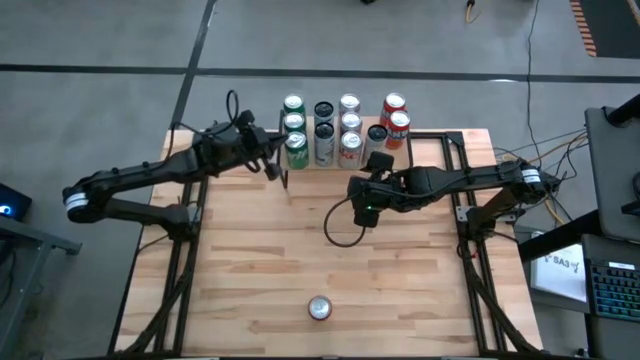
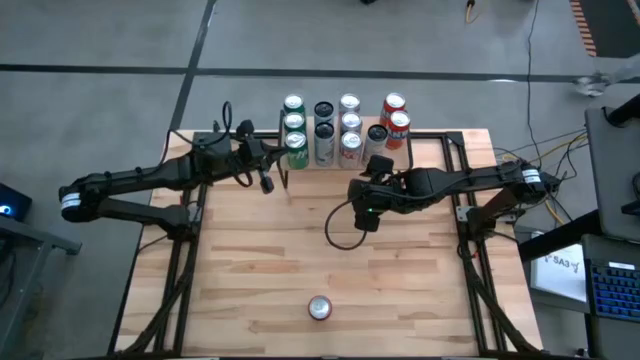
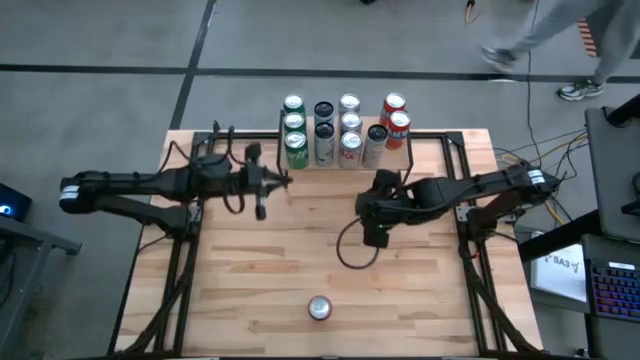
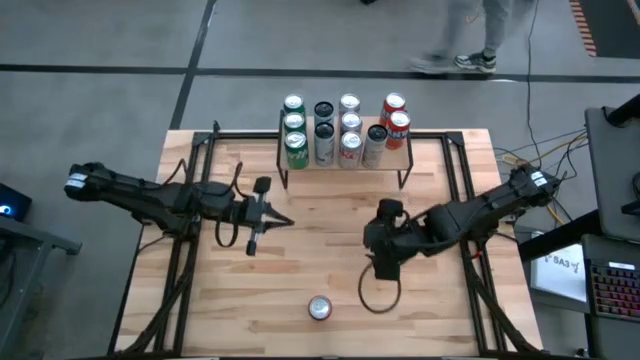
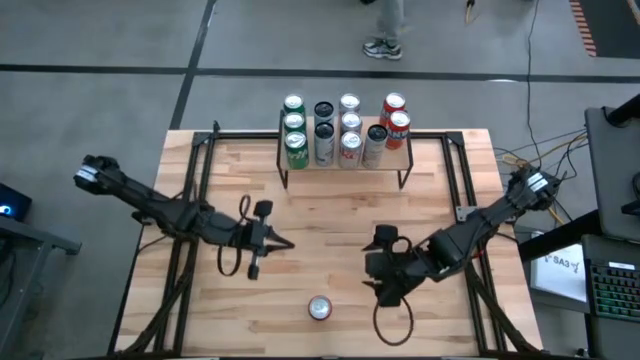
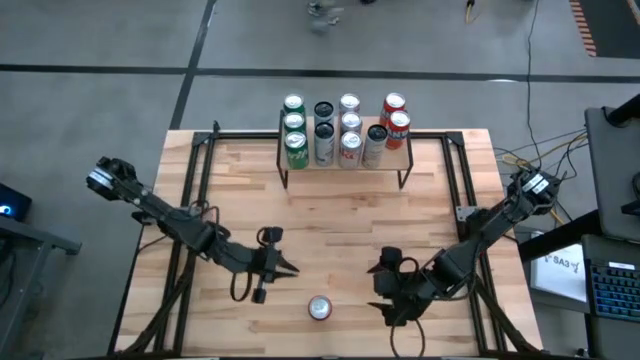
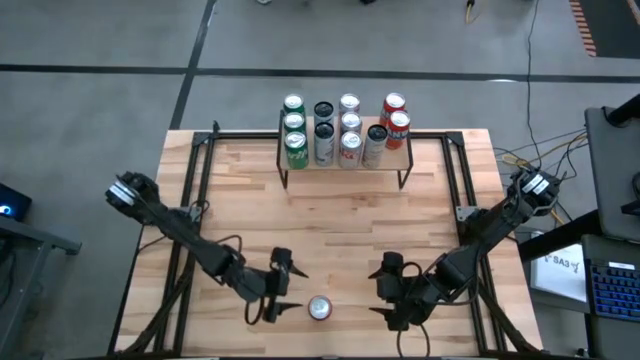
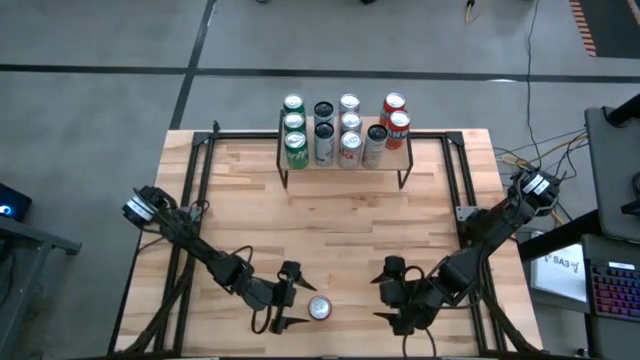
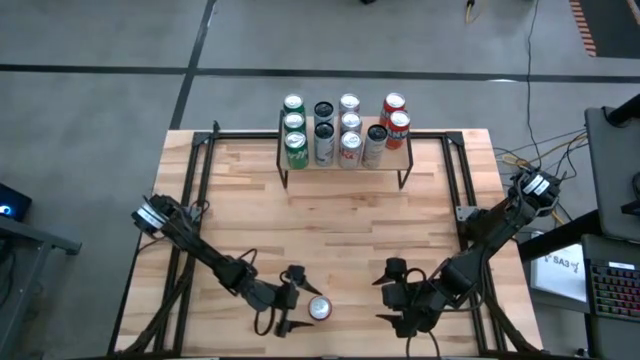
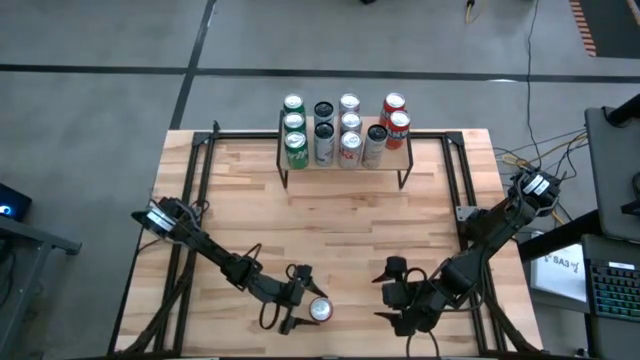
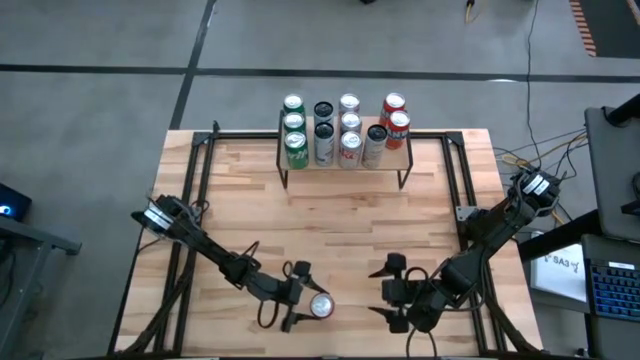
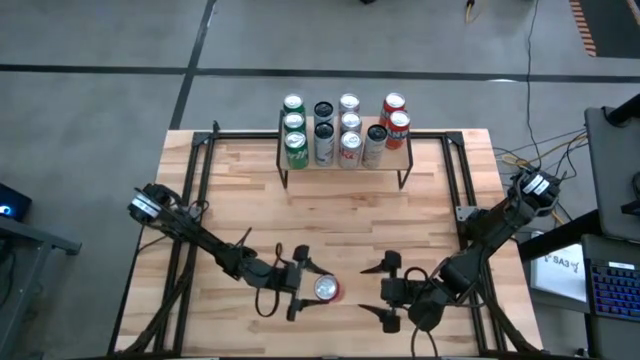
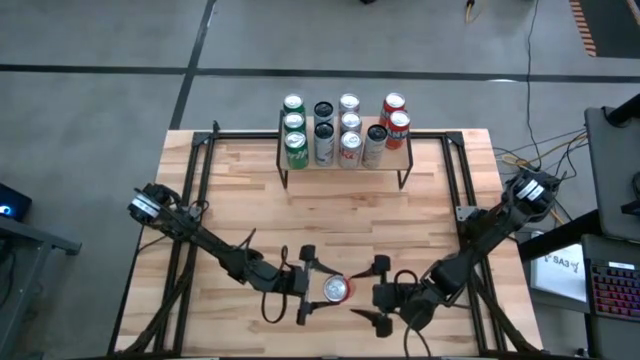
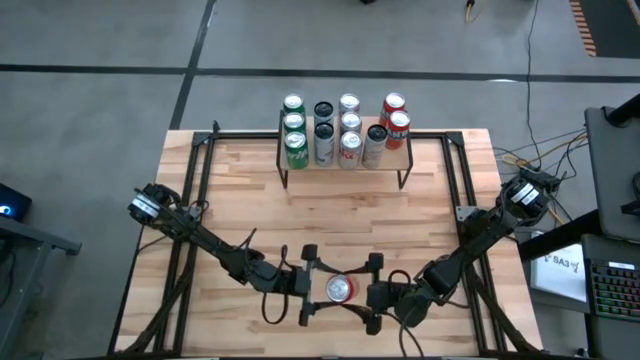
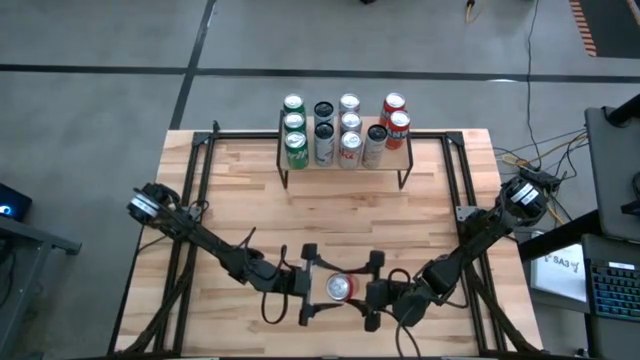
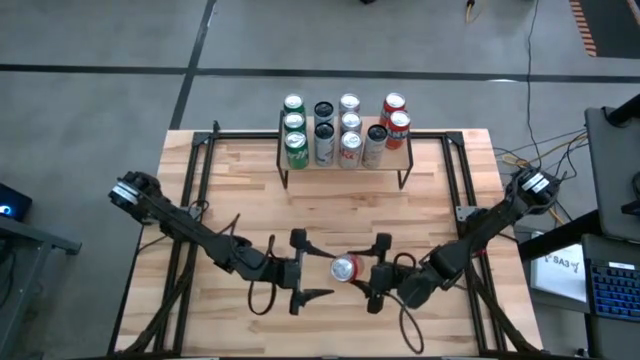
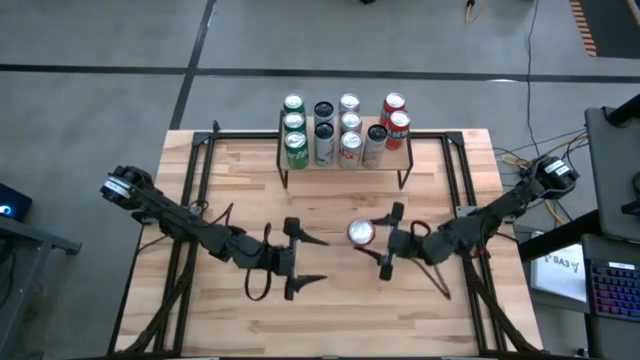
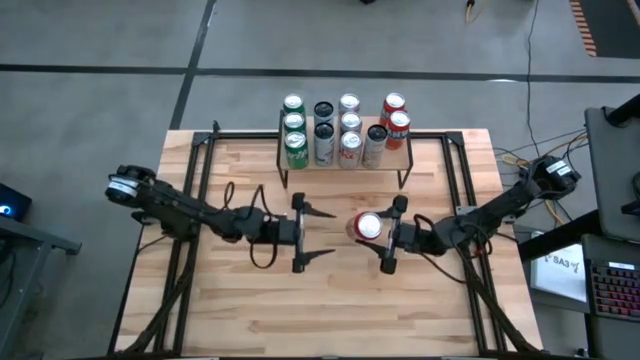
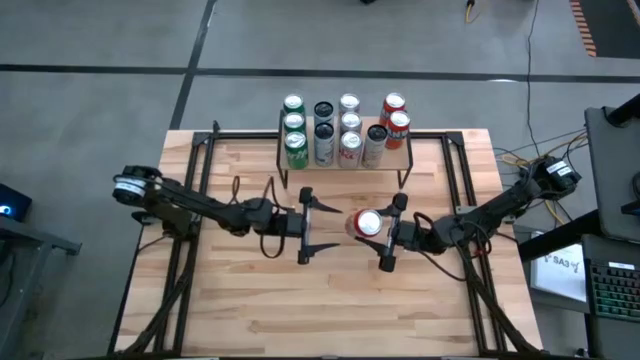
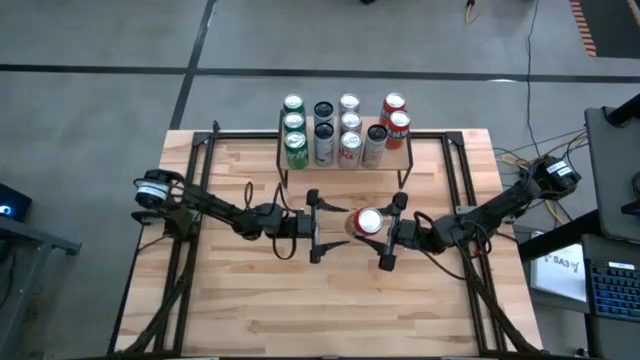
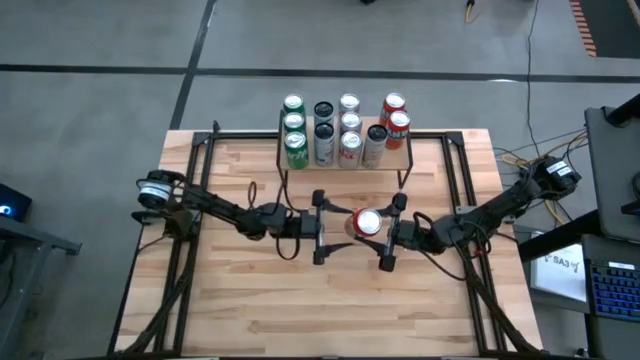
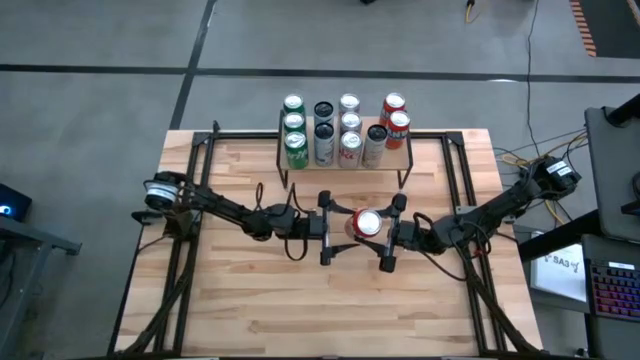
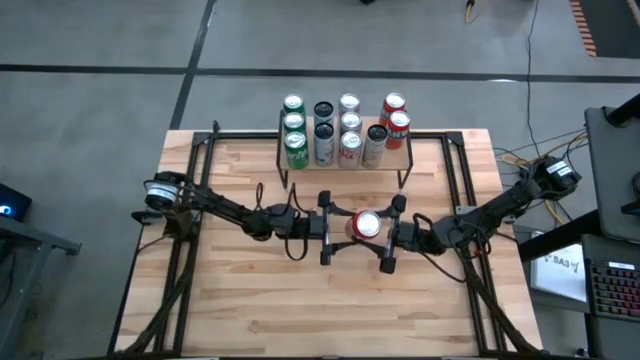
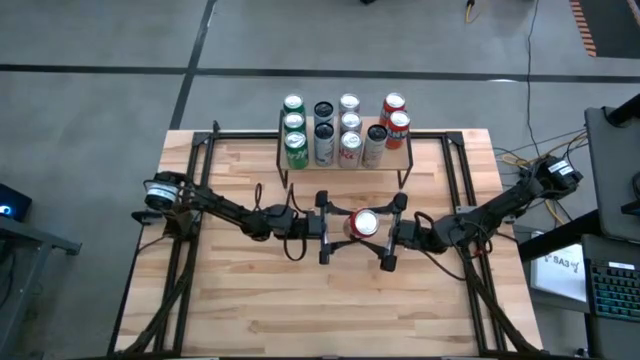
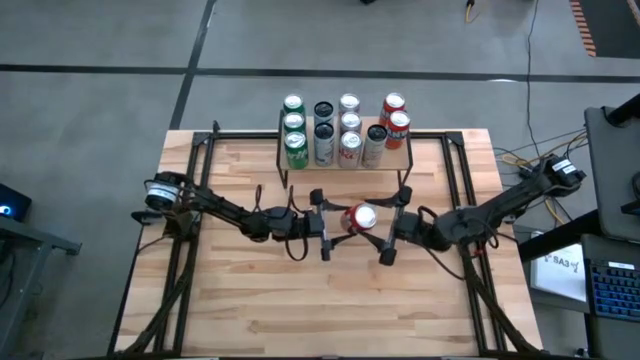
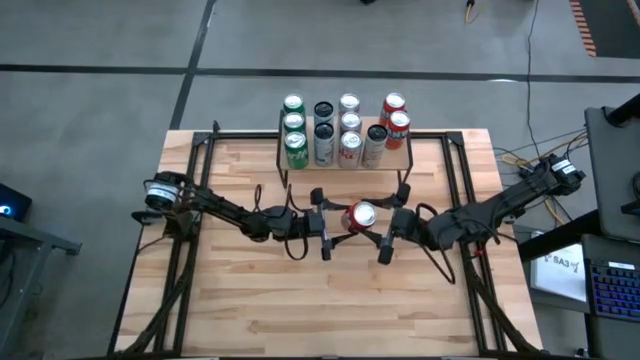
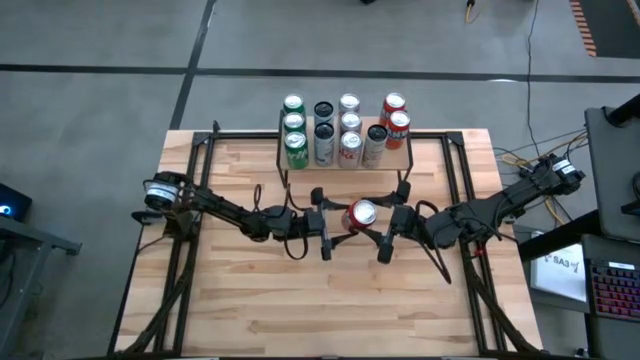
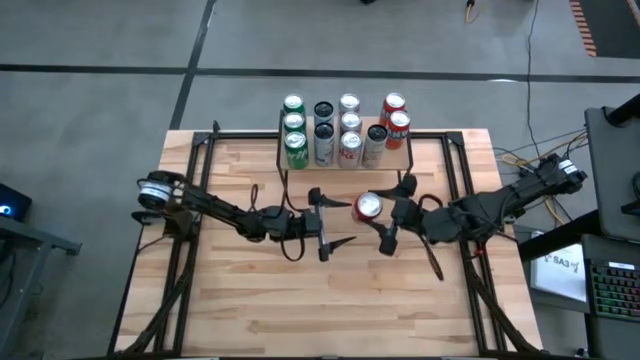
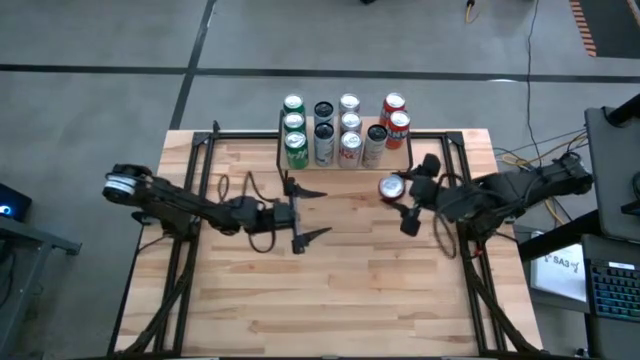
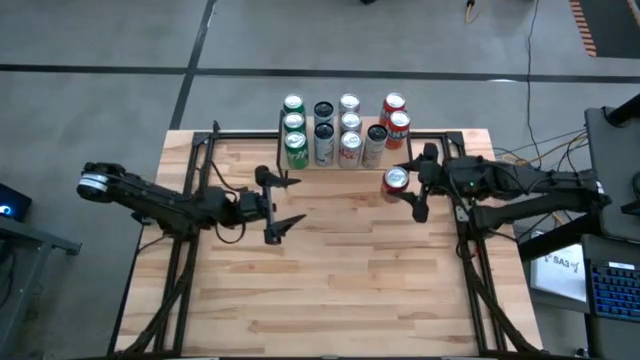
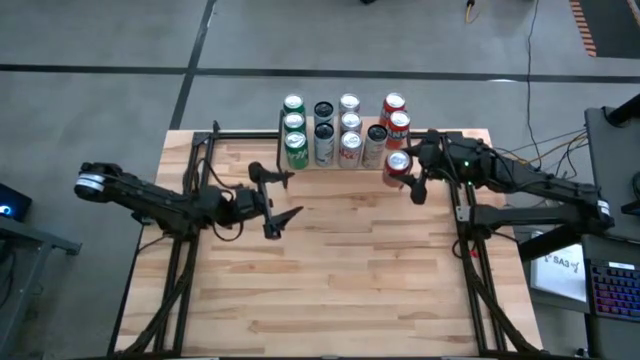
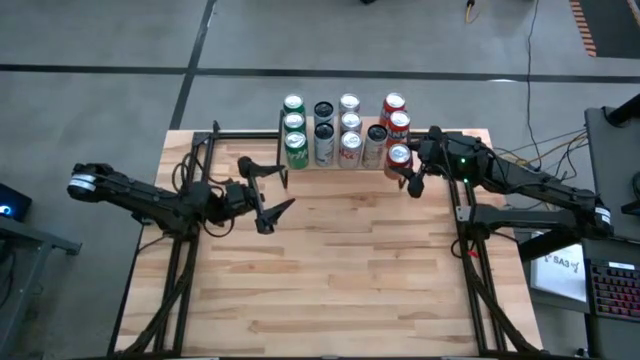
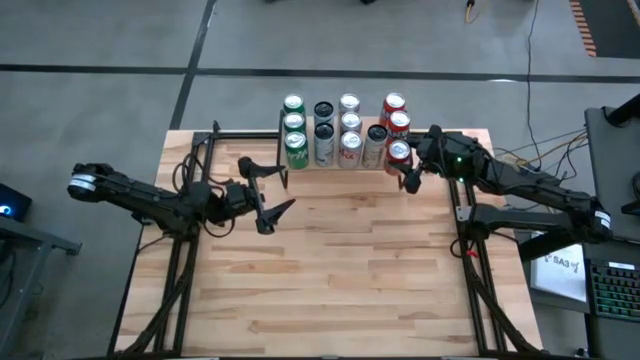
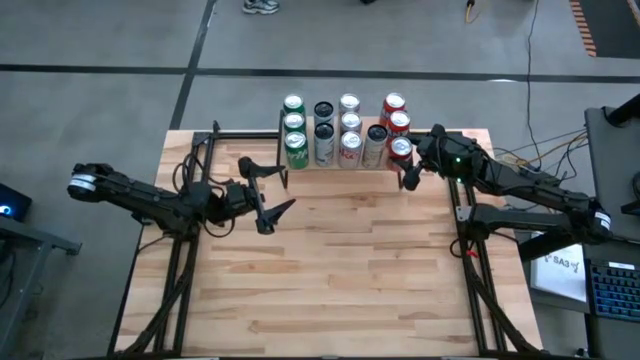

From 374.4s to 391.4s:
Task: Place canned beverage on shelf
Put the orange soda can on the shelf aligned with the other orange soda cans
